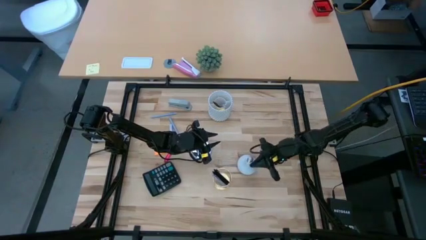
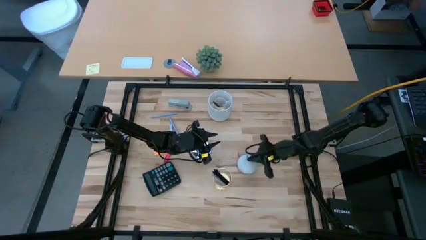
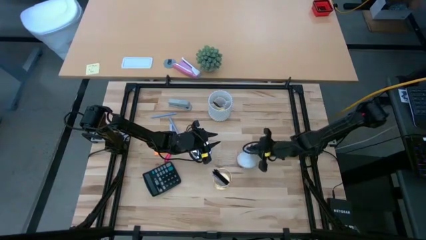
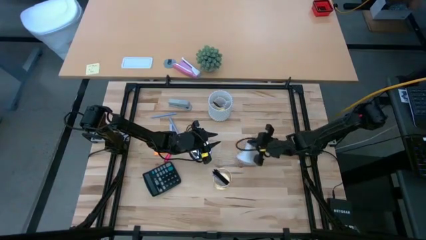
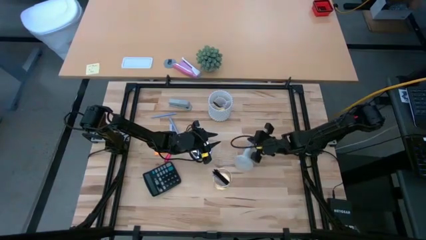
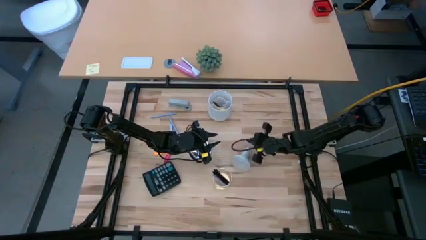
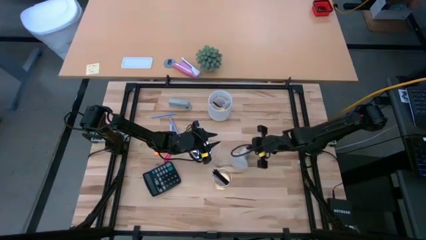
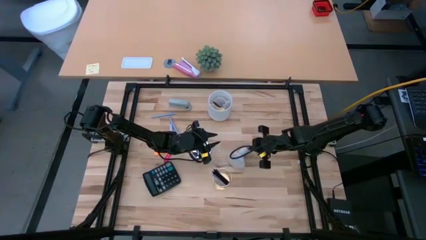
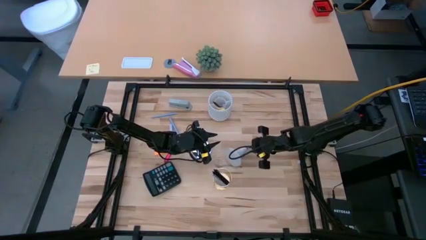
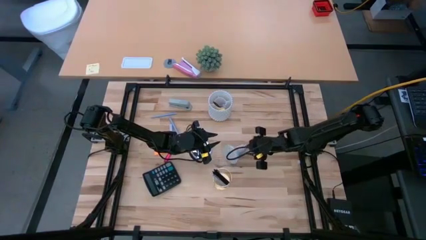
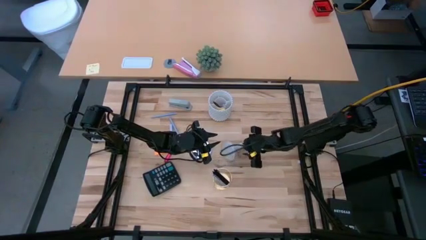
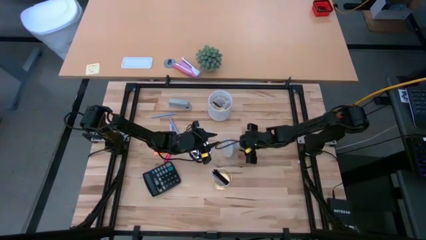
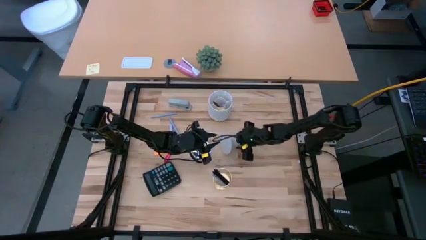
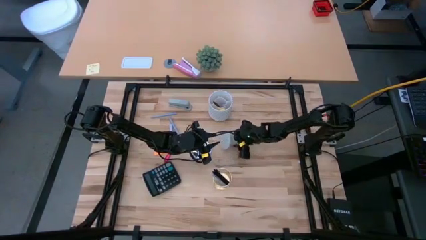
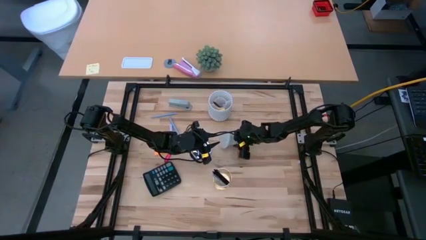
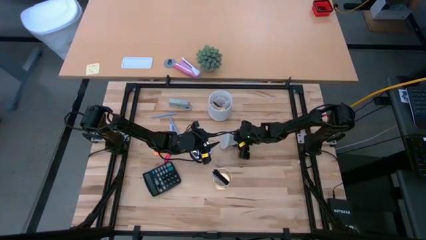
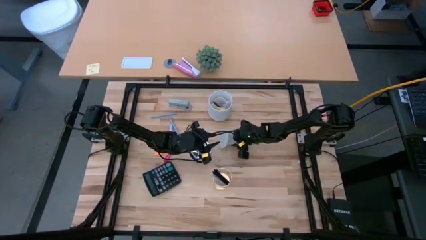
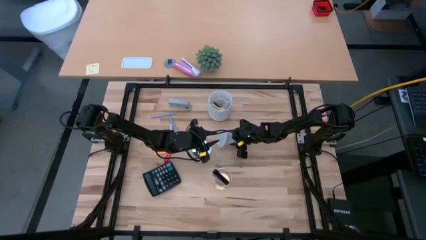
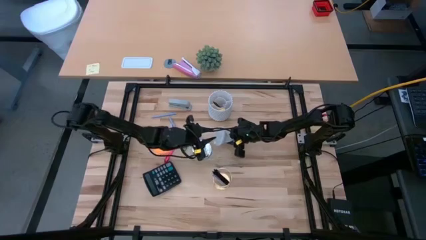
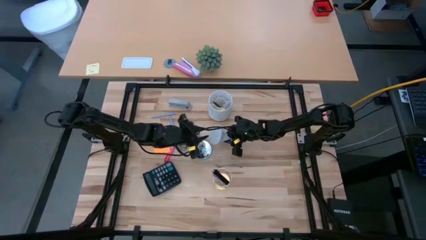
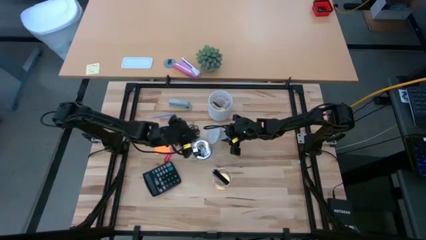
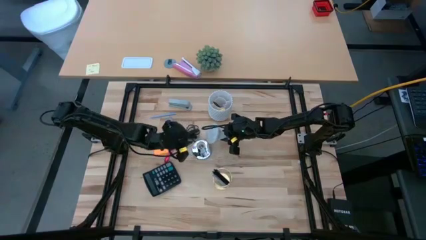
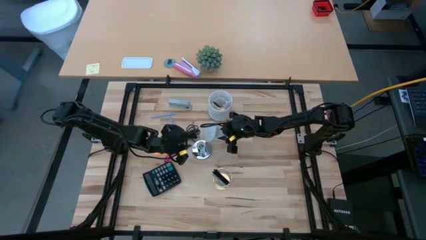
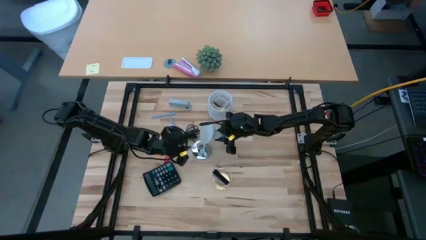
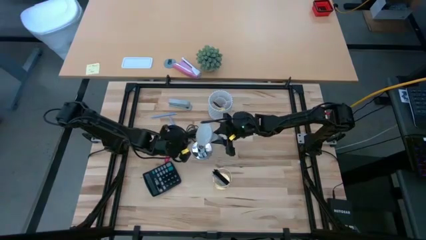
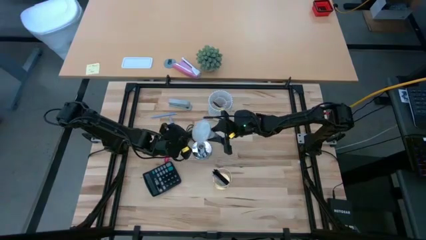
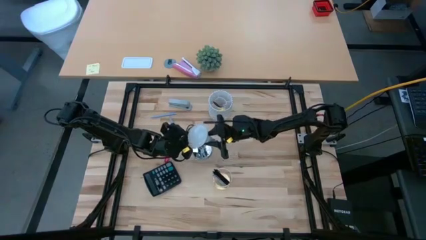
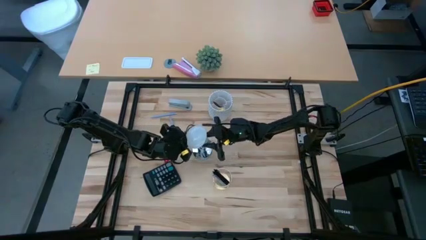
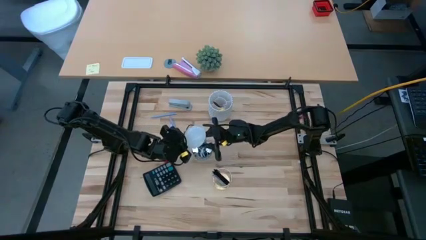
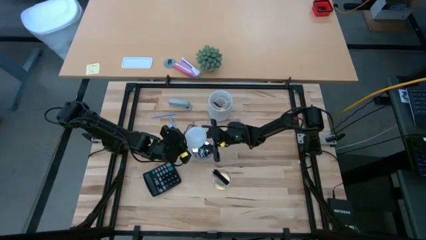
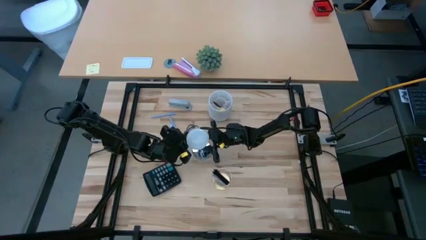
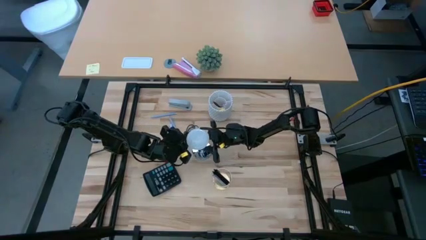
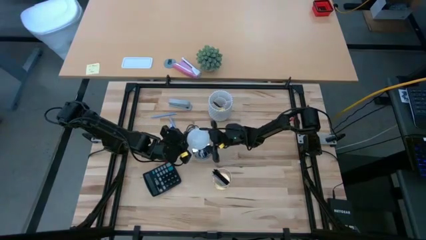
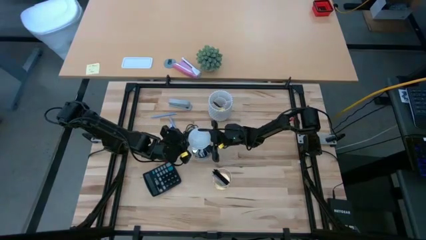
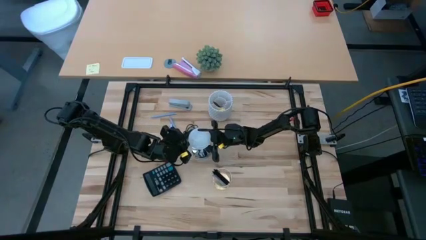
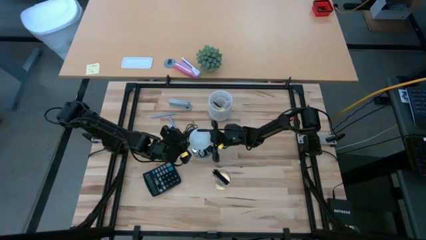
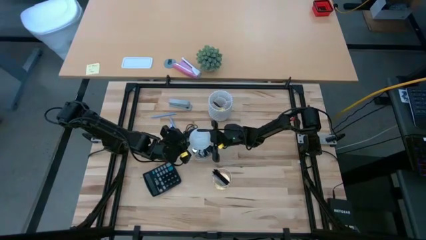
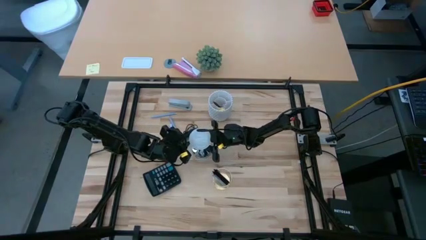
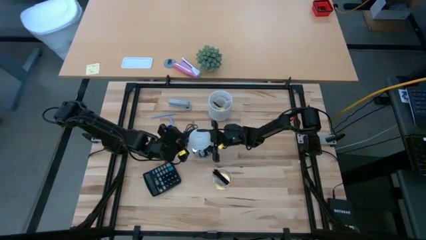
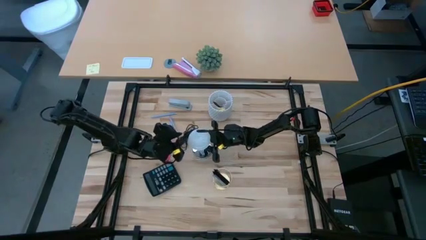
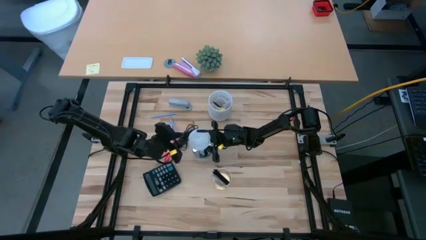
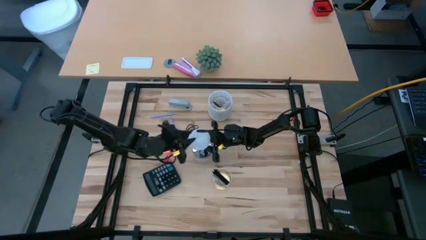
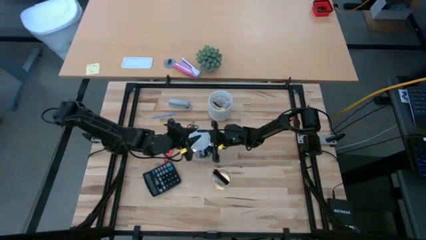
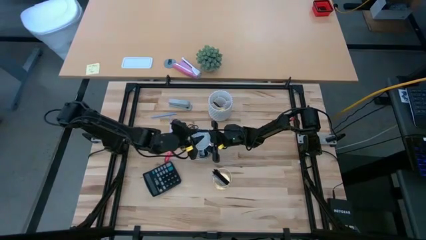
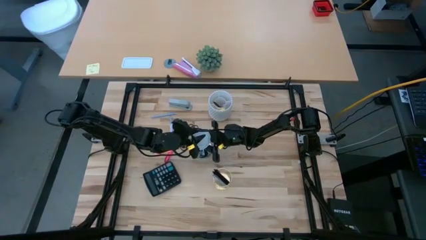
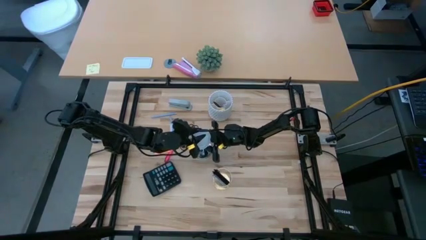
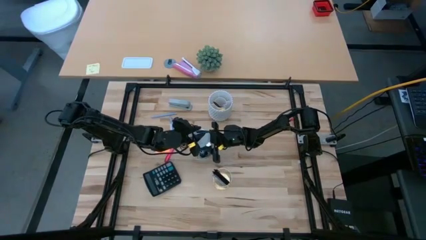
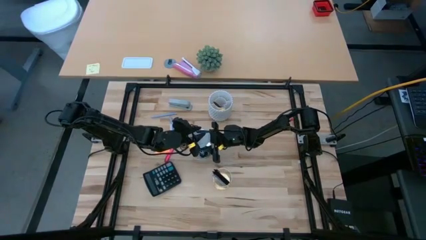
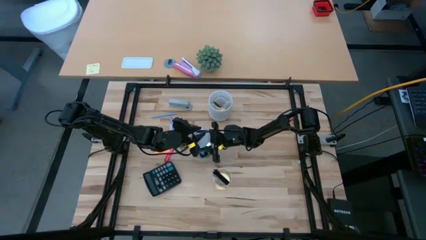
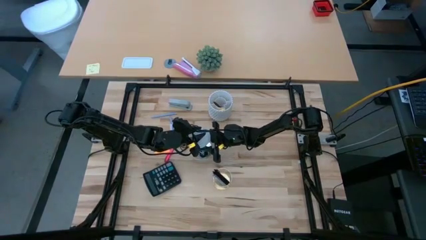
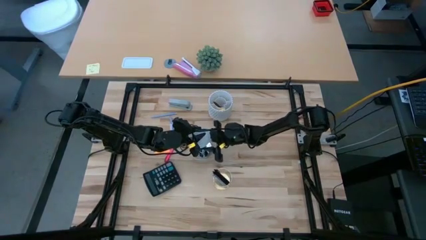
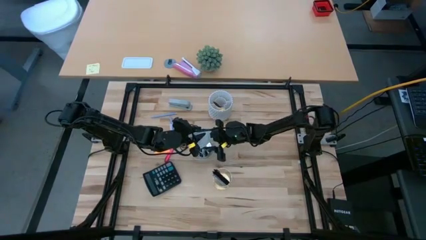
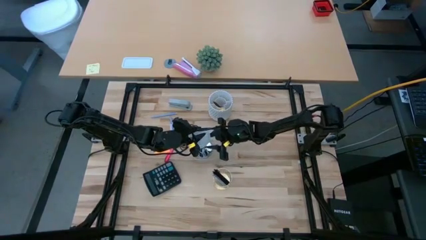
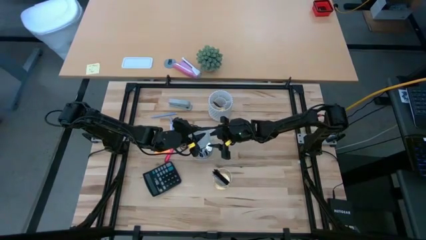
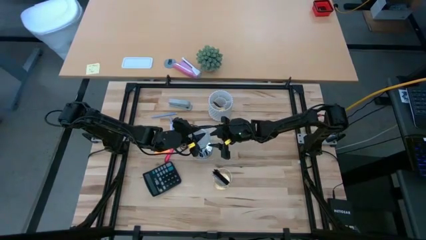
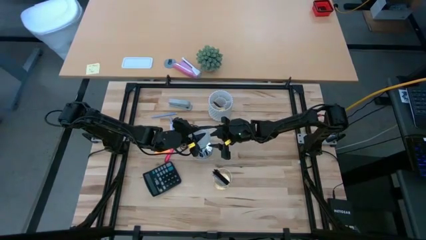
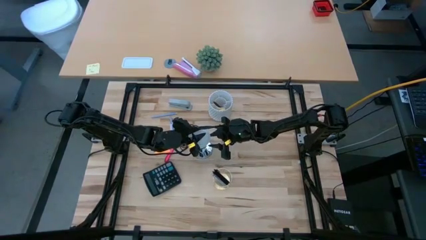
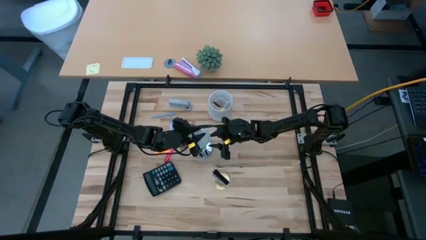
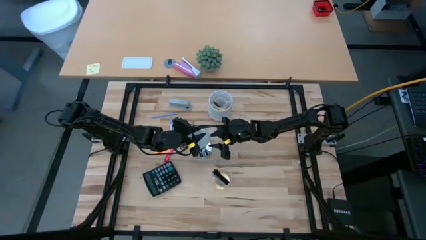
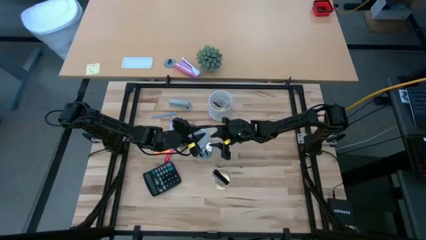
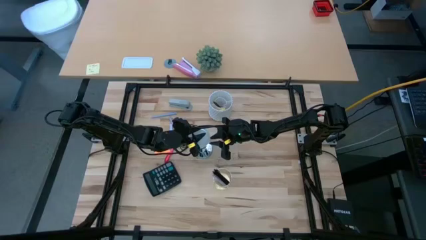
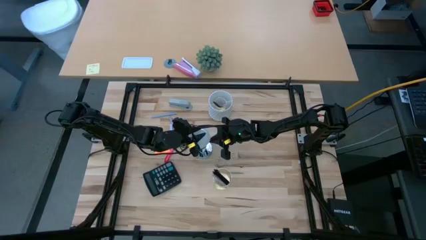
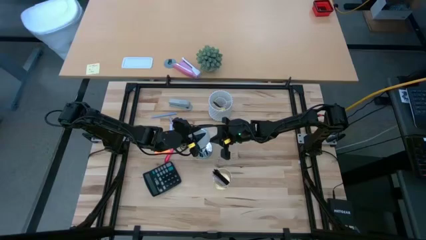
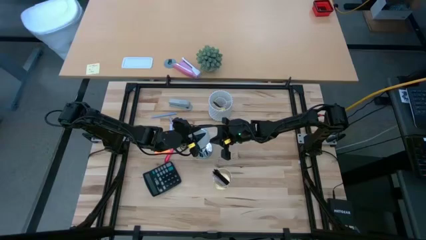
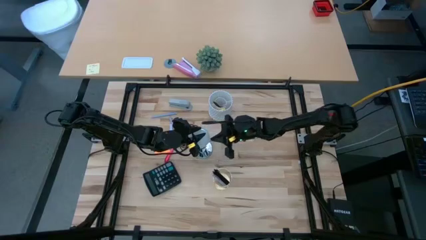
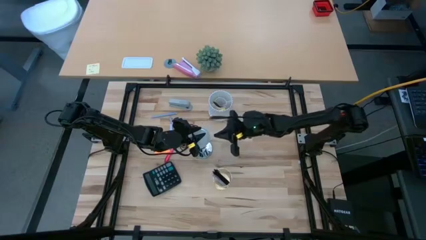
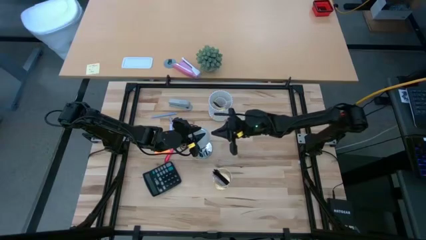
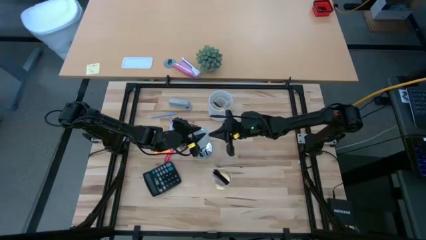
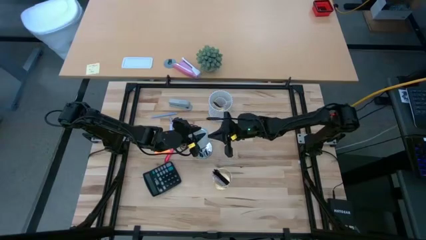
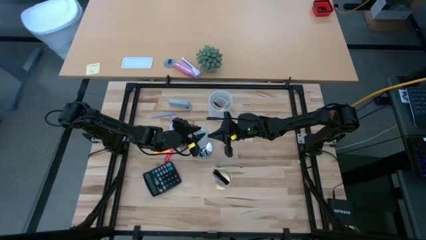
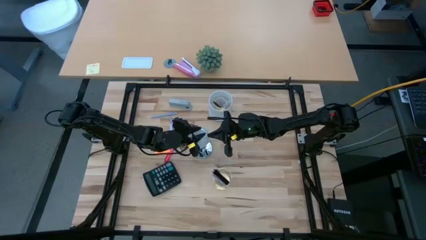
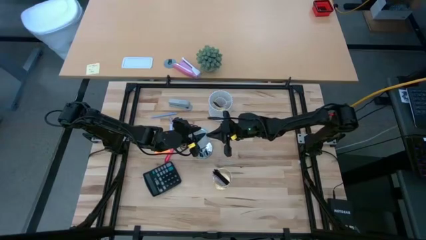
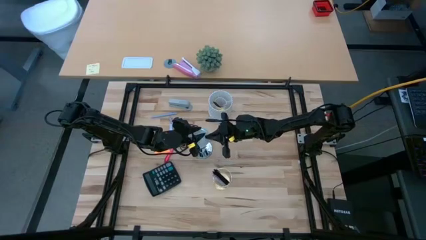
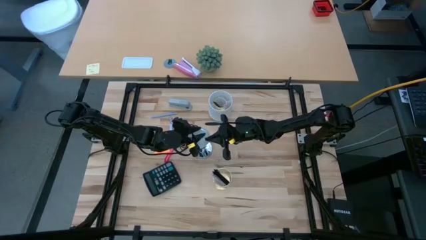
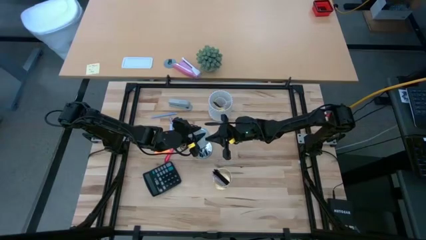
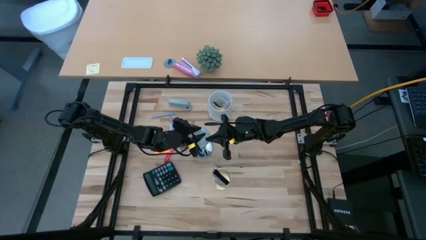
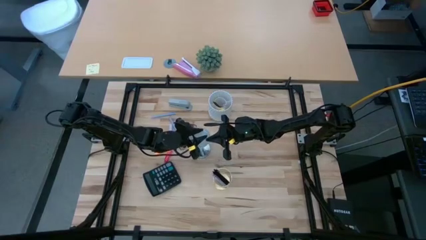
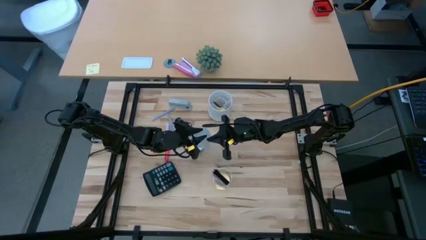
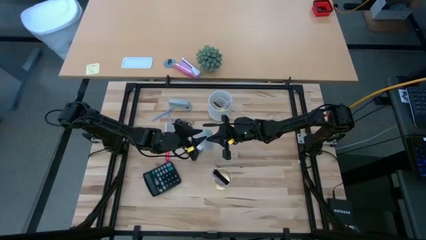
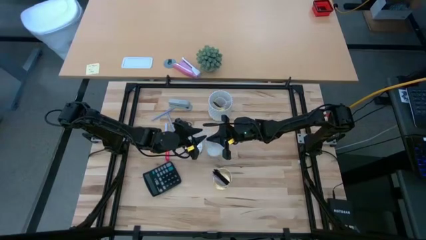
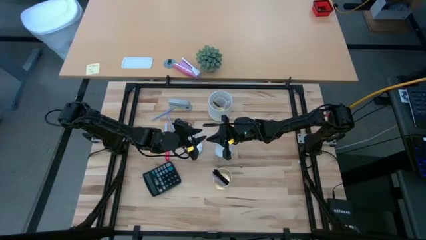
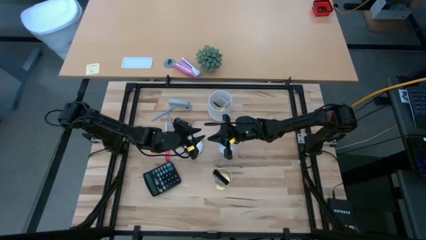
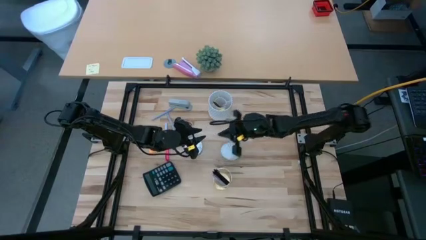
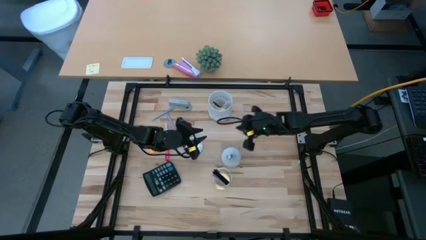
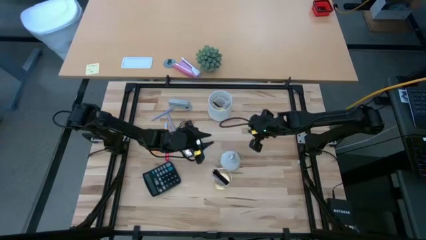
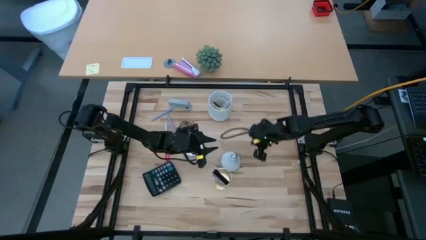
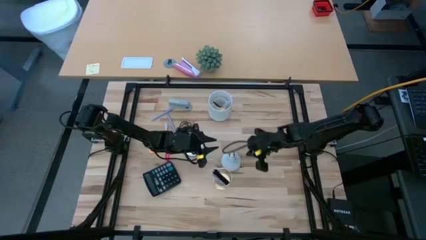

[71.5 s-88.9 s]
Task: Screw lightbulb
Insert the lightbulb into the lamp
